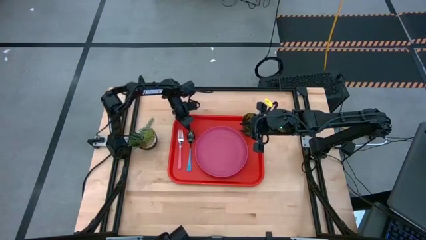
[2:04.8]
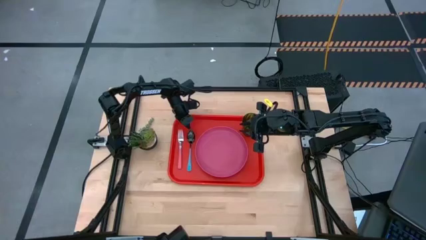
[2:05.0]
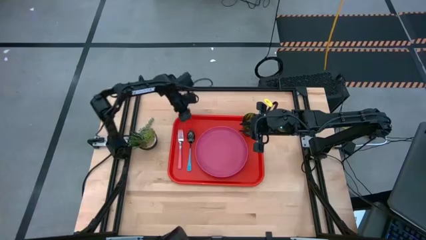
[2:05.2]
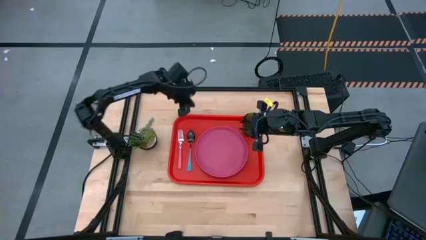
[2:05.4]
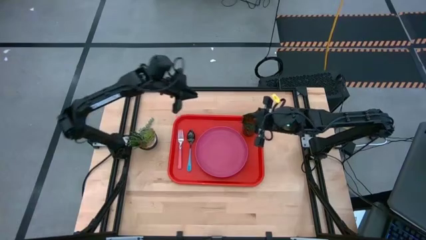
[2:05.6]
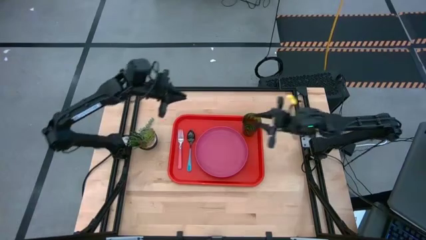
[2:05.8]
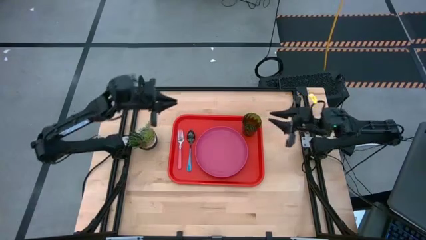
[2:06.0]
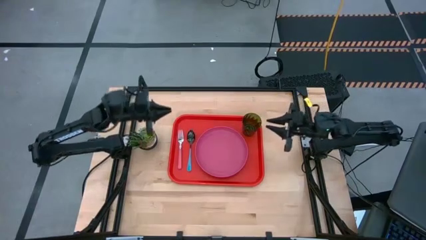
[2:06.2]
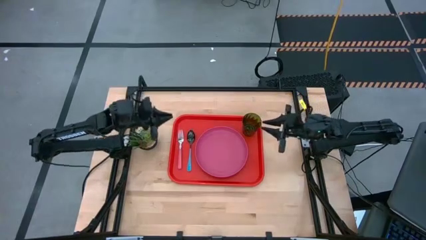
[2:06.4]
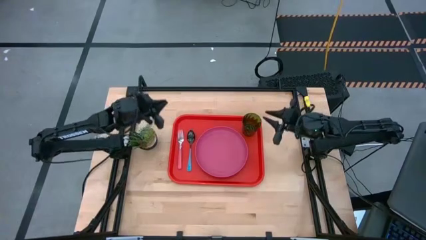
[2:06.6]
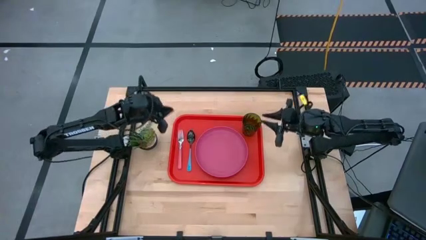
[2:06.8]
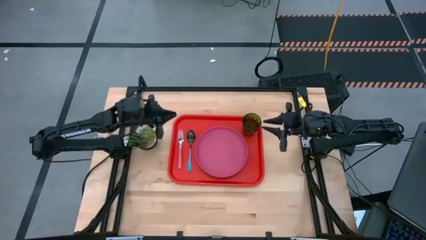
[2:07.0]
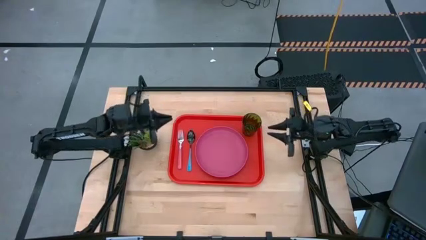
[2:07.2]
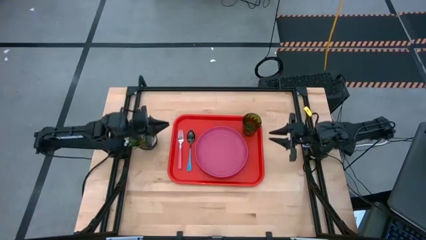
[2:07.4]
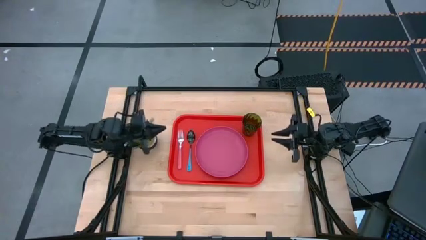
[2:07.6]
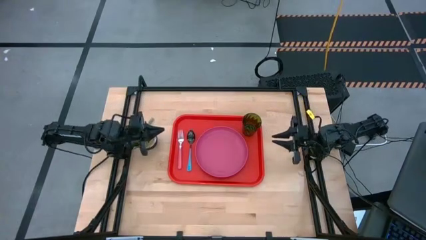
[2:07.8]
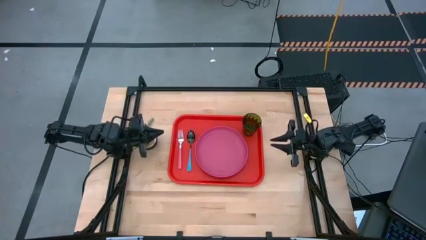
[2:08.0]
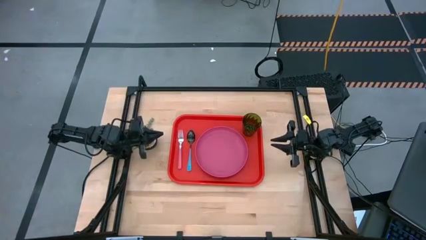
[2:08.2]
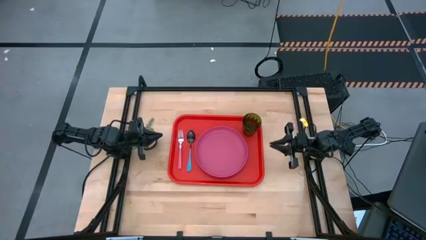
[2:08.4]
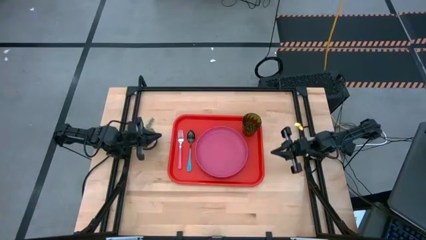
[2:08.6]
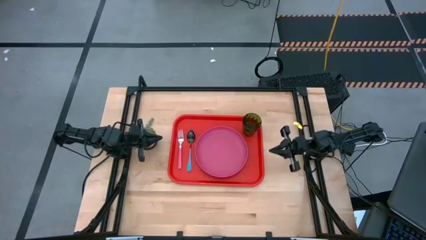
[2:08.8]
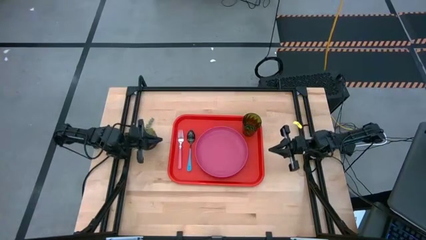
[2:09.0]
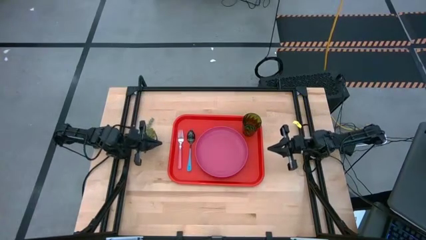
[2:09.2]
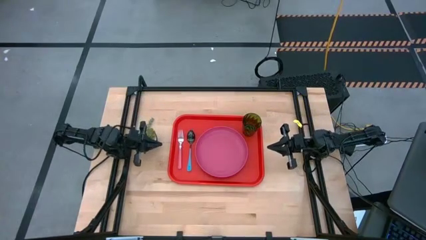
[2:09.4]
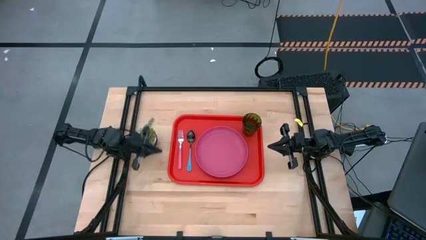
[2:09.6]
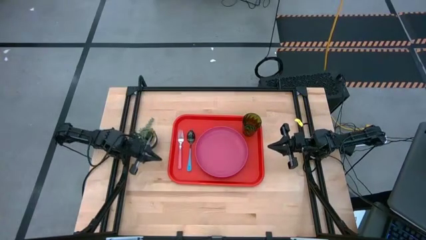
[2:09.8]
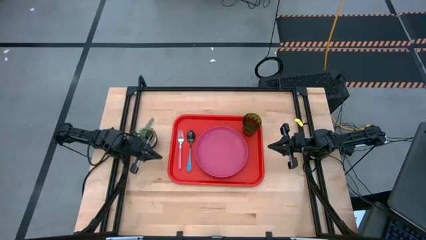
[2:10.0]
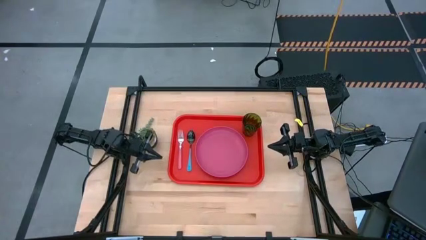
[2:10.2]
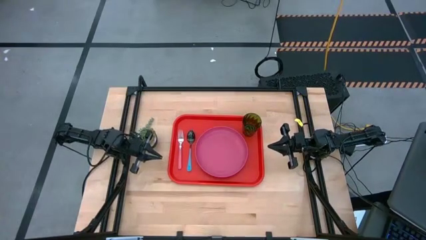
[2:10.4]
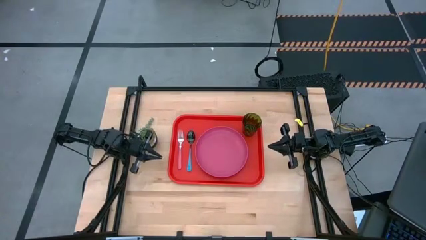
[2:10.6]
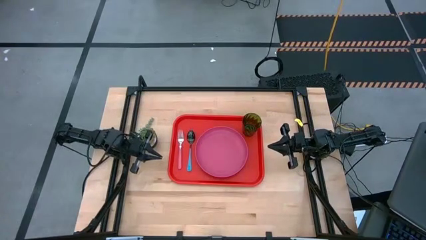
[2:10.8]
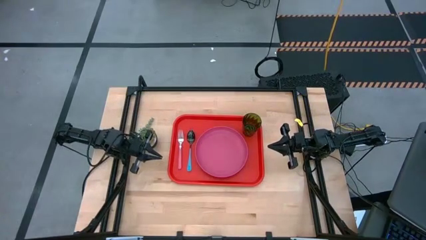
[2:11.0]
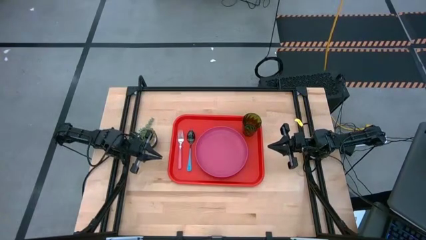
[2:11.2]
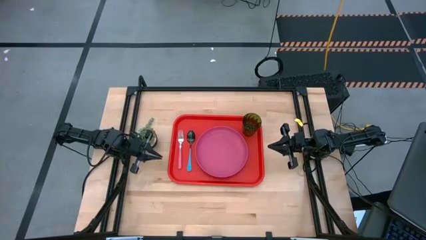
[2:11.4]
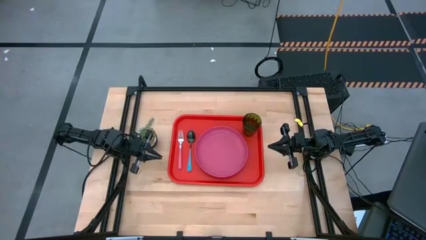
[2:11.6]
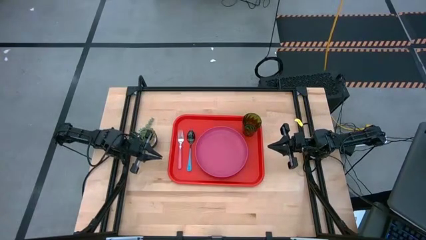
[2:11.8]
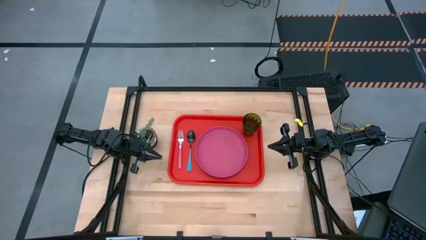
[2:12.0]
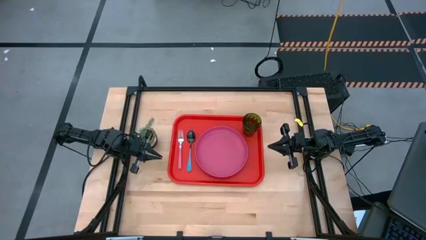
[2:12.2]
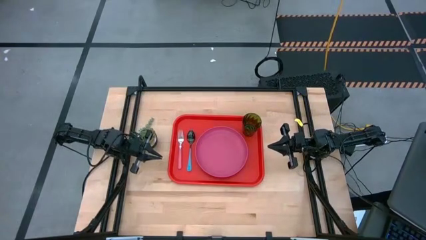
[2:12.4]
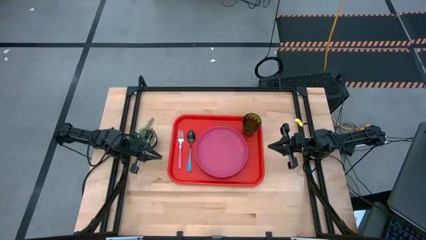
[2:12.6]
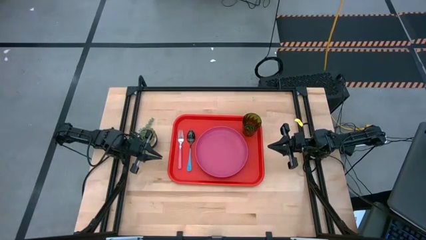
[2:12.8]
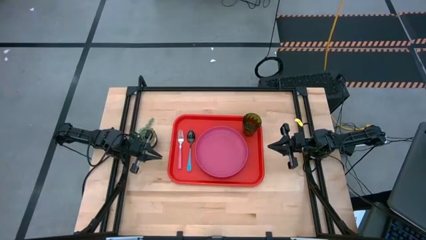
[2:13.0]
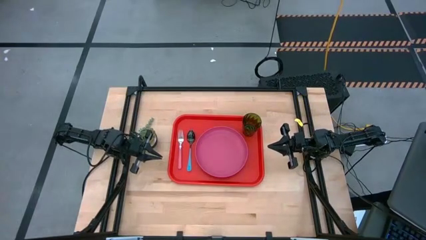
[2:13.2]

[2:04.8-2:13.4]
Task: Pick and place plate/cup/fork/spoon on tray
Return to Home Position

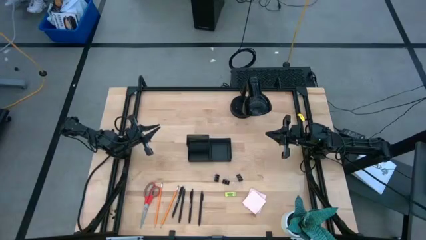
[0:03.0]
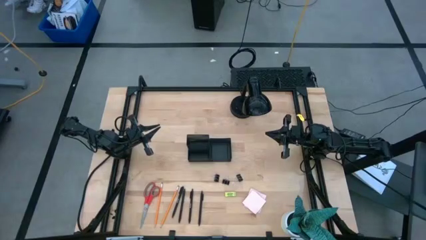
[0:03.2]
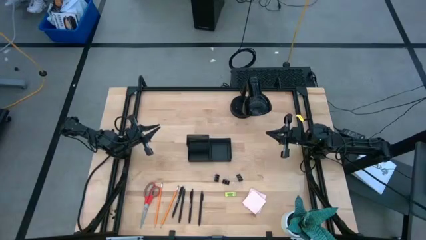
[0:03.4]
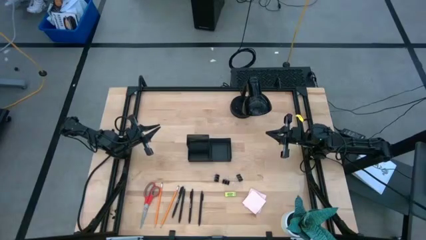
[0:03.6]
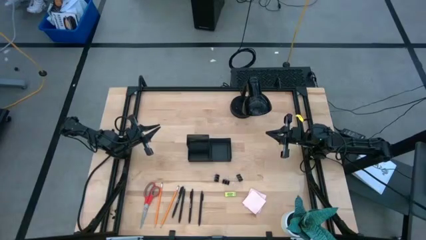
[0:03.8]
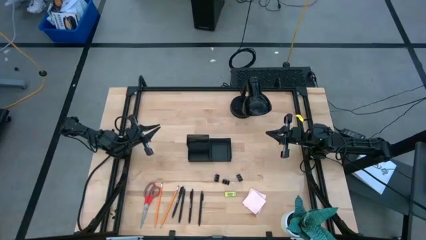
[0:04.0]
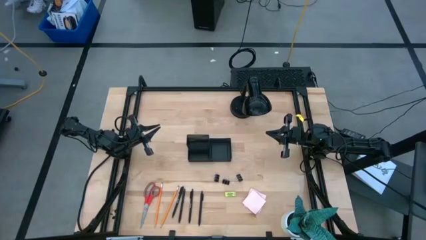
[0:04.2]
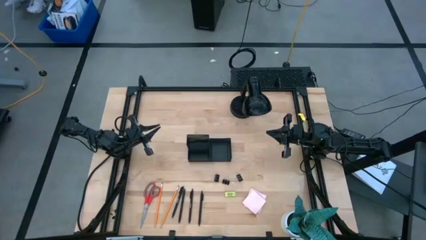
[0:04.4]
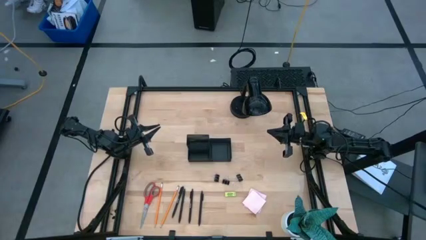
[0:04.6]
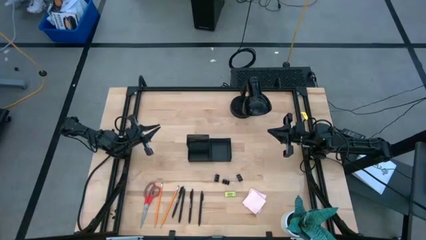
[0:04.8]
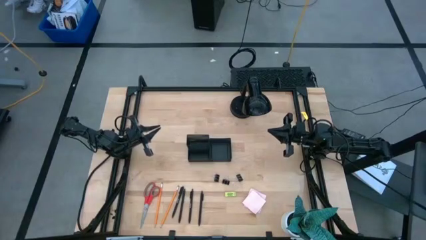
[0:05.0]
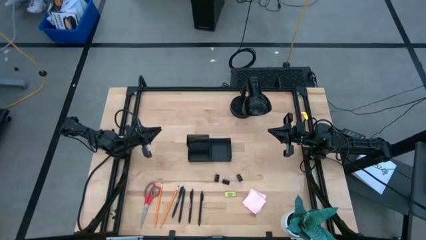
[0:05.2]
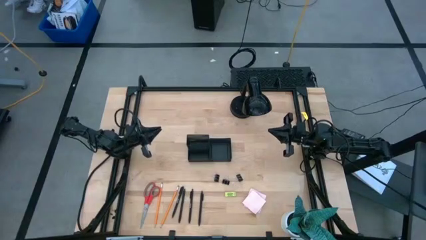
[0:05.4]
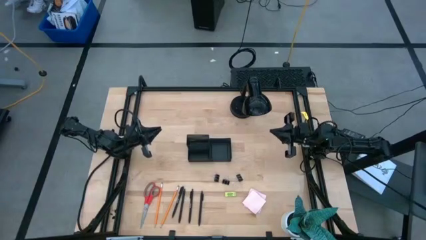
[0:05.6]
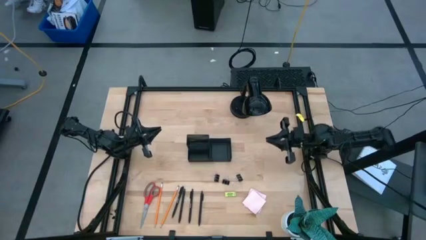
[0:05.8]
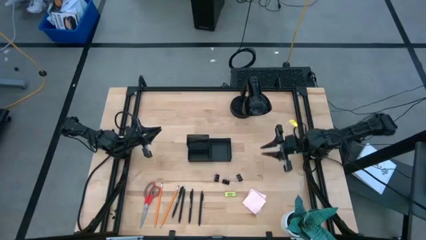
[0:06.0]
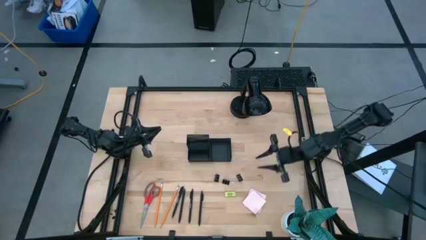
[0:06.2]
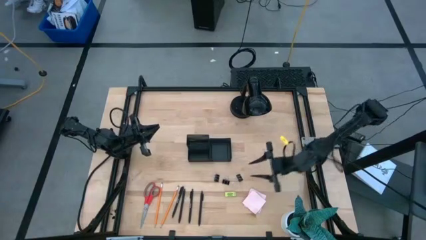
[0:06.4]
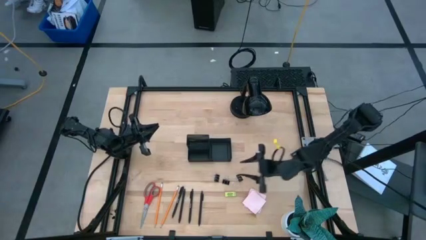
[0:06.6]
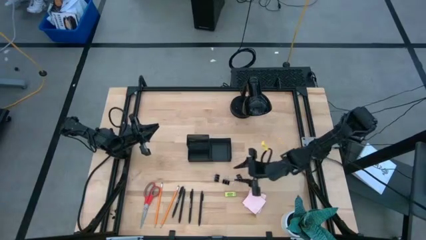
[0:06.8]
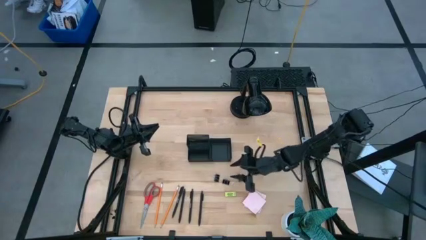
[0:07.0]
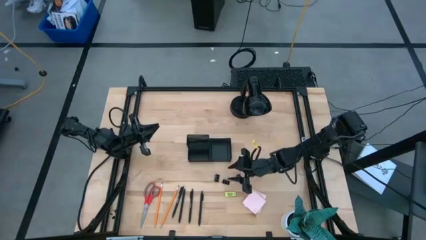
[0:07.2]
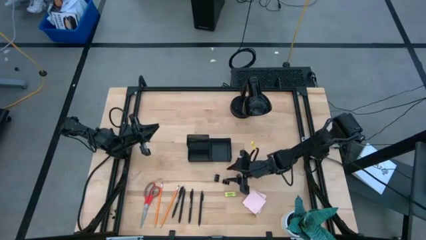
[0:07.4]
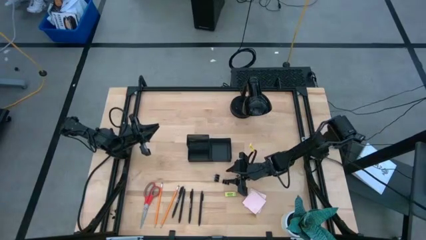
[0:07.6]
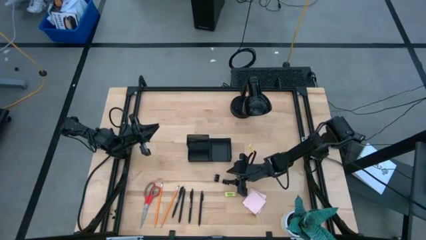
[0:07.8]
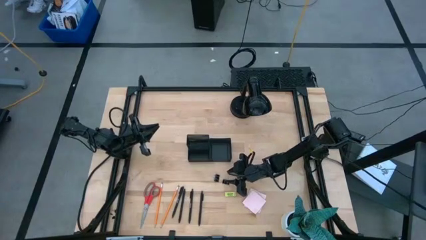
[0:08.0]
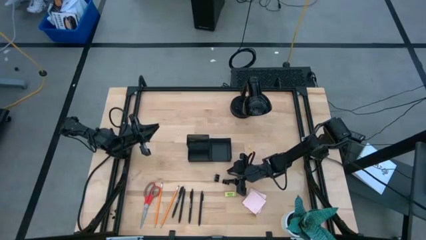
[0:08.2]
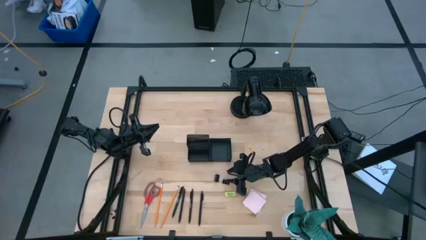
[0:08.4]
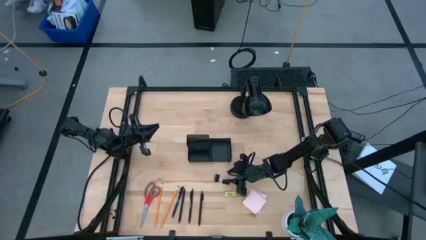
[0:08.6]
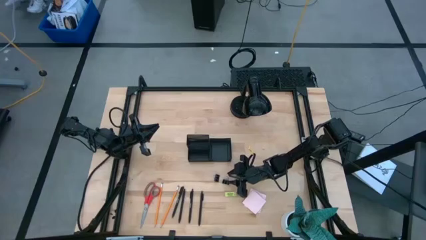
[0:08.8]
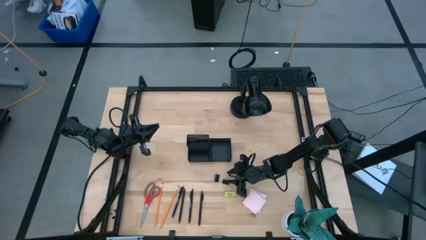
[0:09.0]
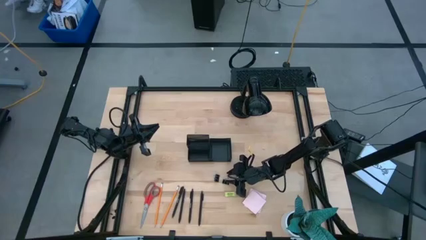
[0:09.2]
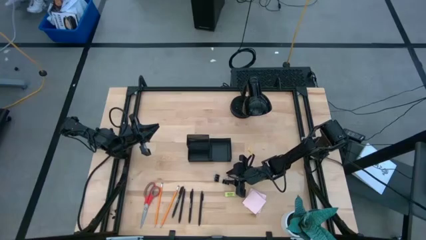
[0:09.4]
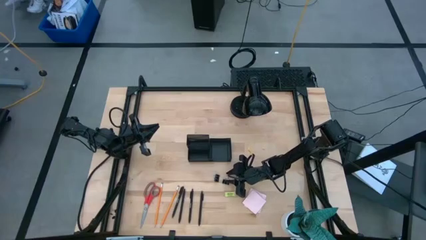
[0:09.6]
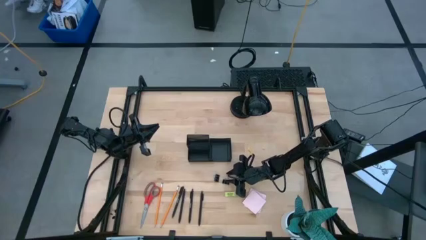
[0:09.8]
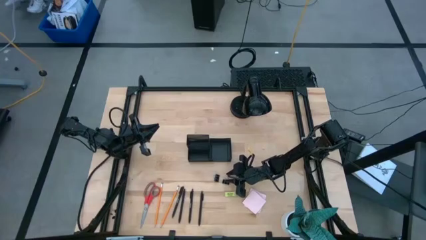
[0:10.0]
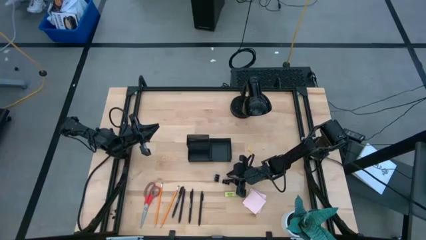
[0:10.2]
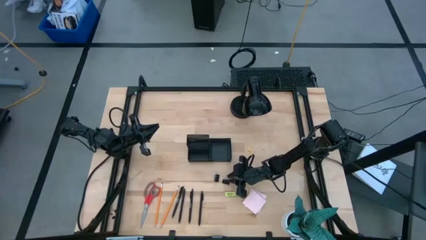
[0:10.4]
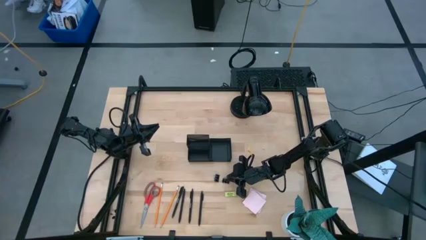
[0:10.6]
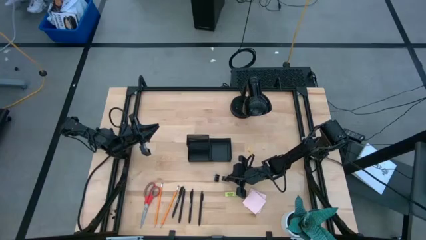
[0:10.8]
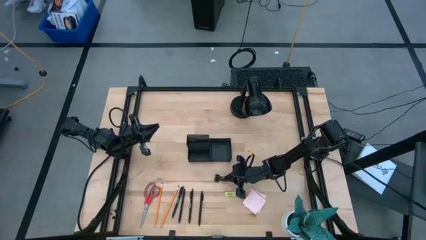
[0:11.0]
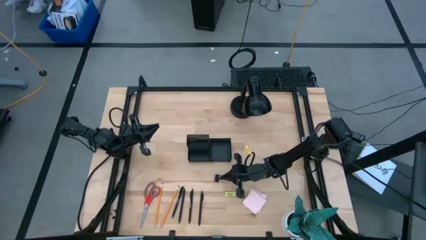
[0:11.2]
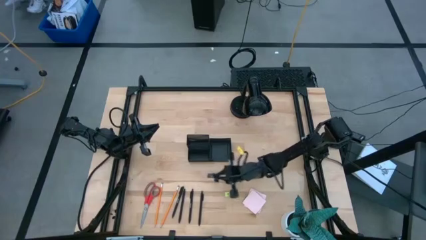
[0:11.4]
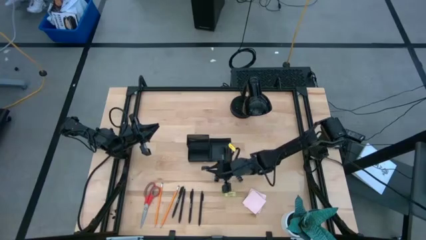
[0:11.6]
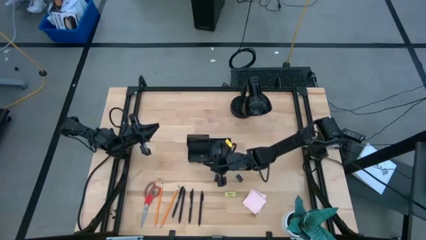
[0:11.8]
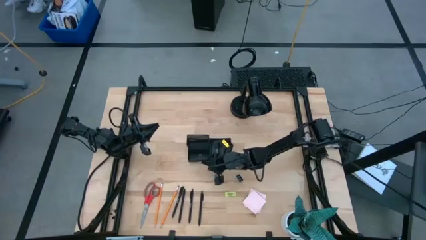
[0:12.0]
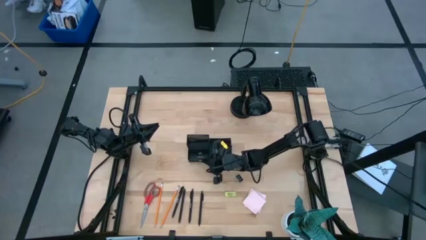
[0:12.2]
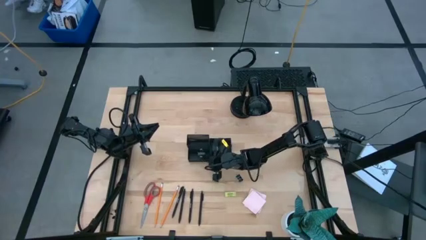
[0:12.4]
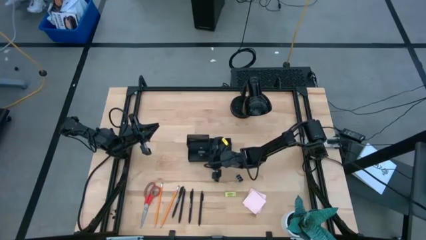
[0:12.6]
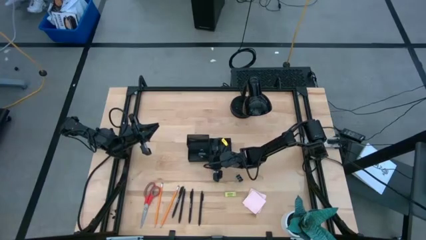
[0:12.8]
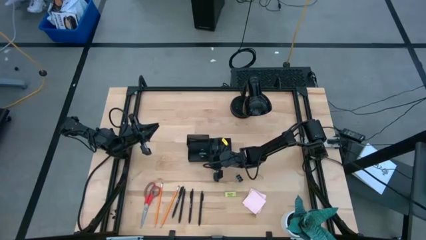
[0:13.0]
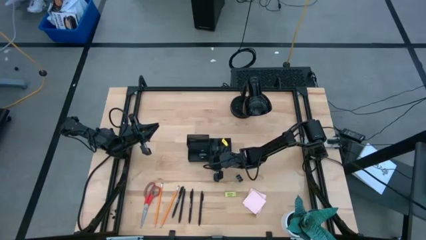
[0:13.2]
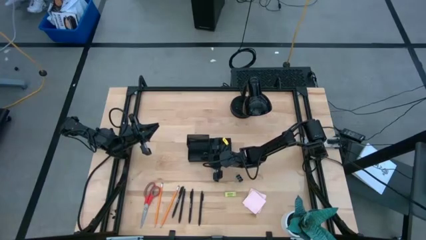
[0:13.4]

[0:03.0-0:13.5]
Task: Pick and place office supplies into organizer
Put the black binder clip into the black desk organizer
